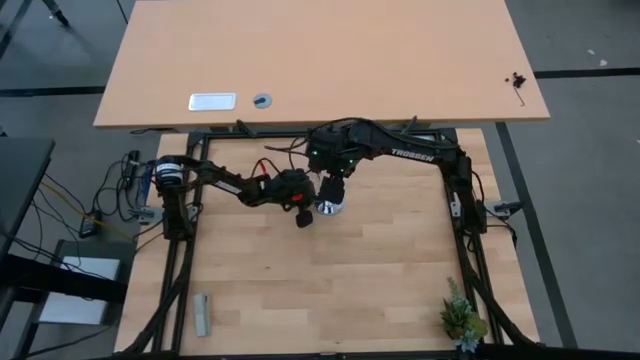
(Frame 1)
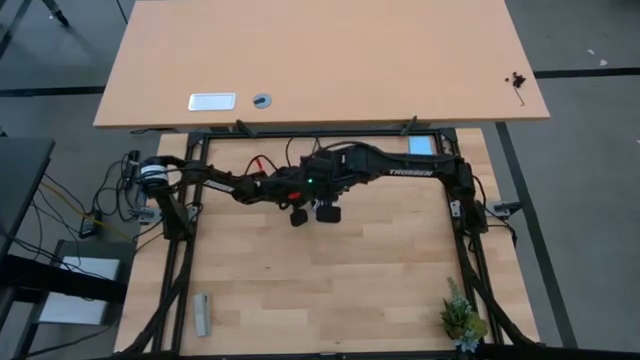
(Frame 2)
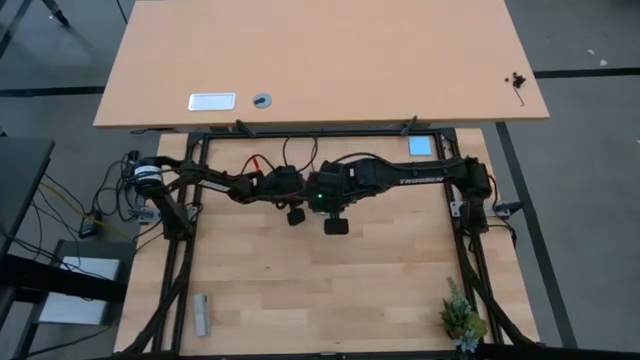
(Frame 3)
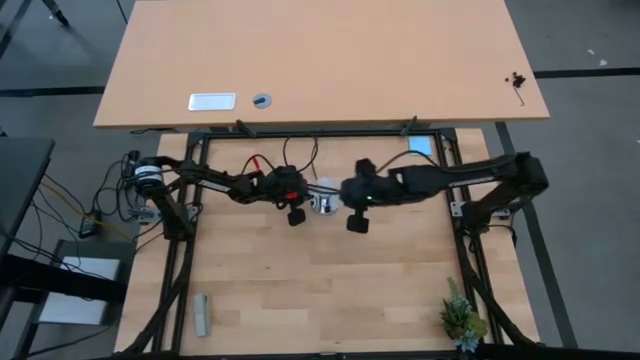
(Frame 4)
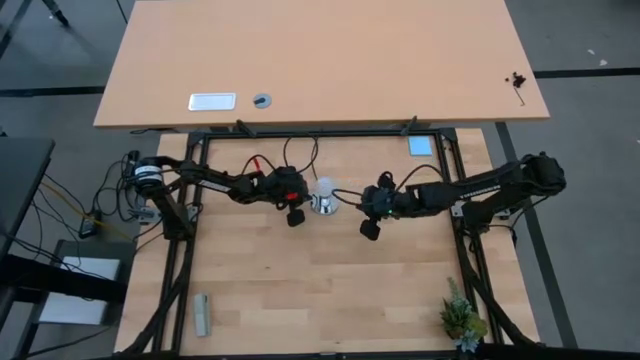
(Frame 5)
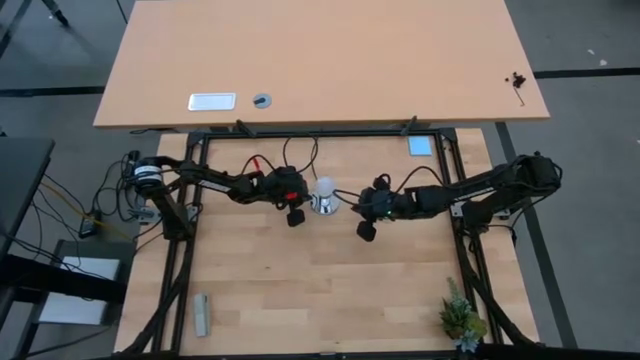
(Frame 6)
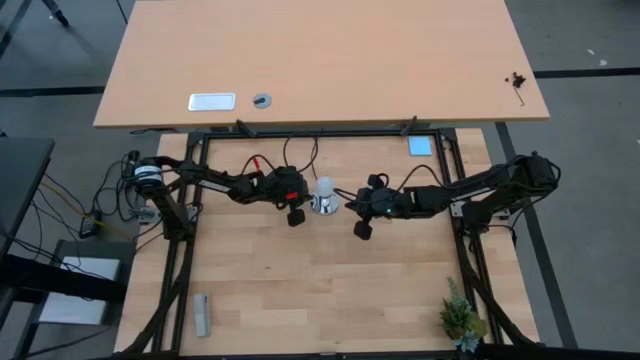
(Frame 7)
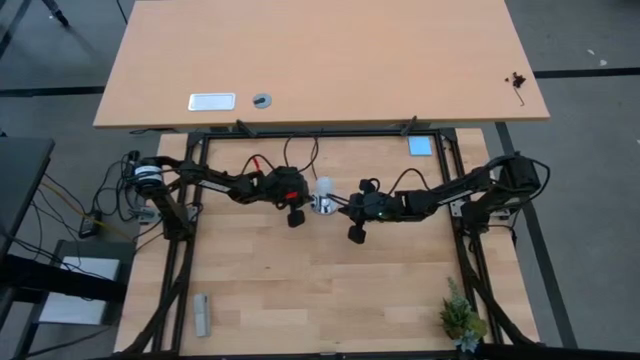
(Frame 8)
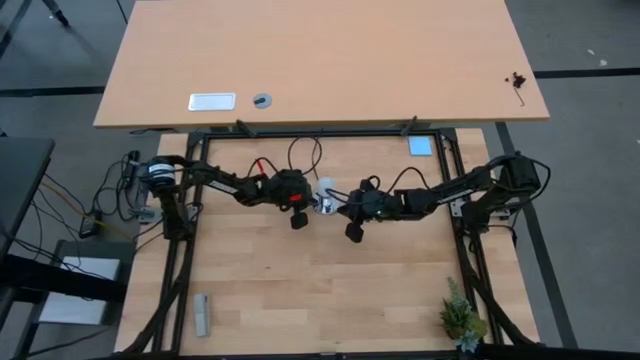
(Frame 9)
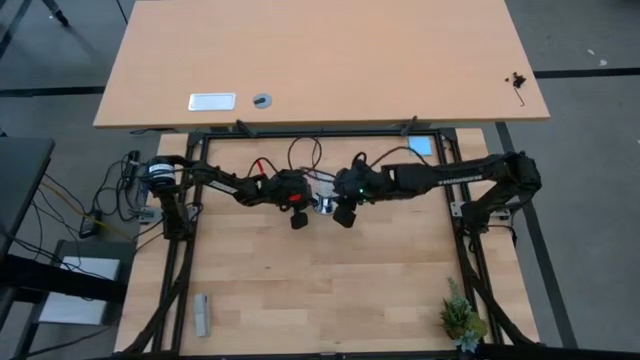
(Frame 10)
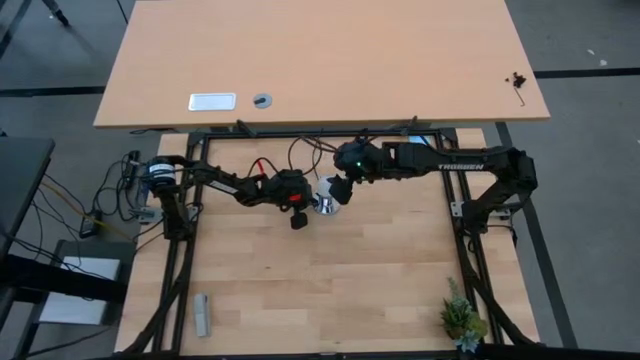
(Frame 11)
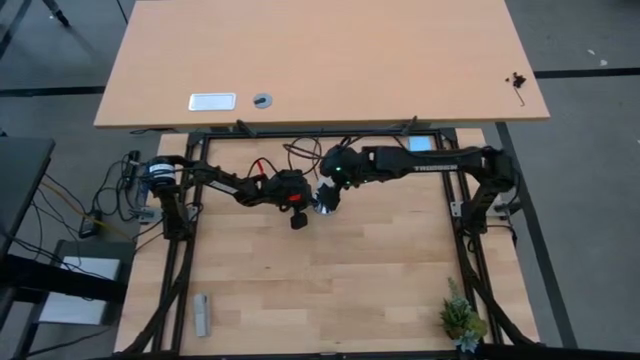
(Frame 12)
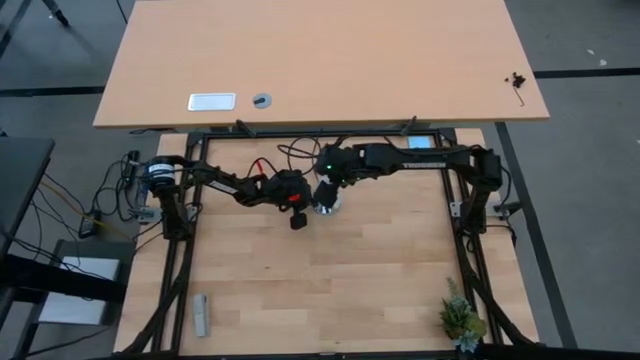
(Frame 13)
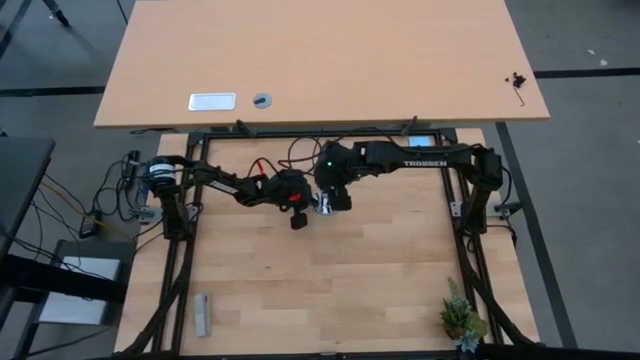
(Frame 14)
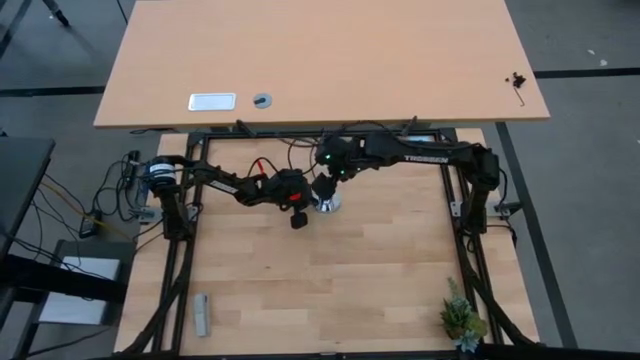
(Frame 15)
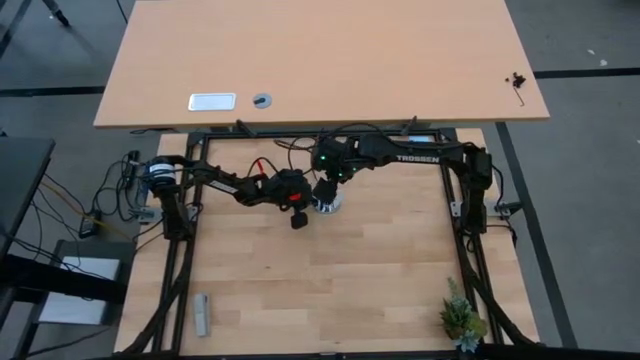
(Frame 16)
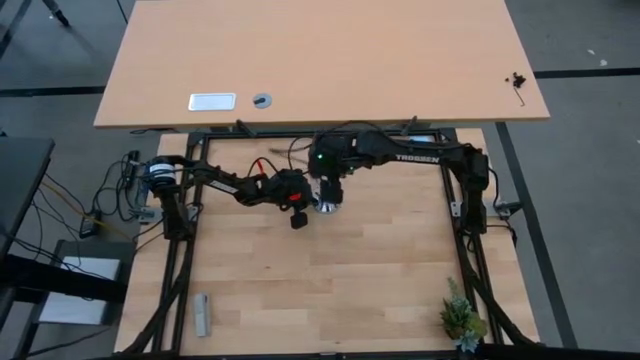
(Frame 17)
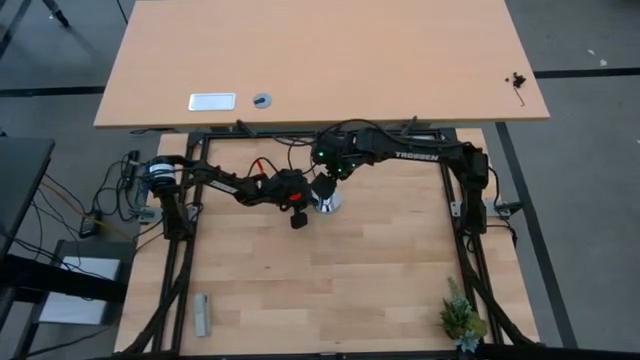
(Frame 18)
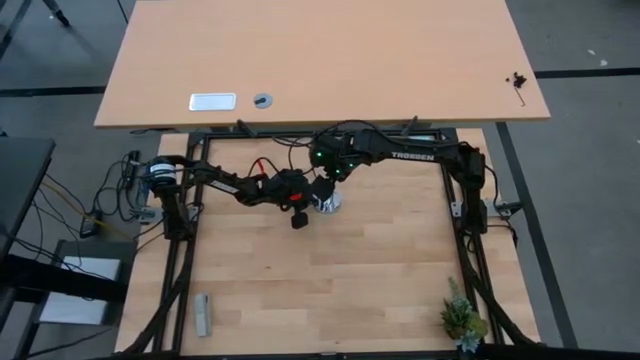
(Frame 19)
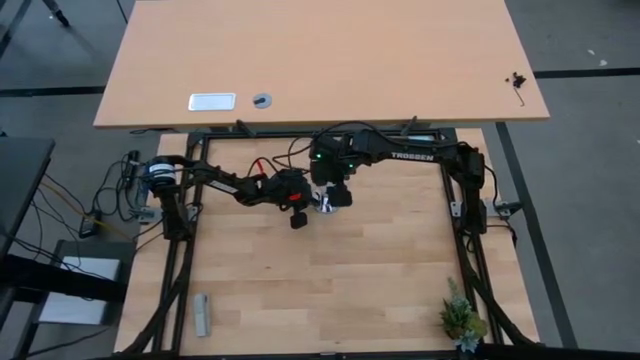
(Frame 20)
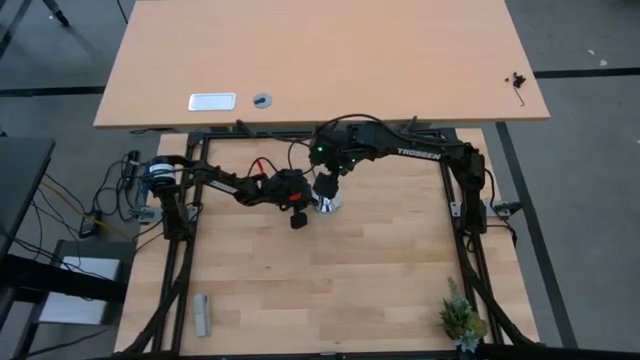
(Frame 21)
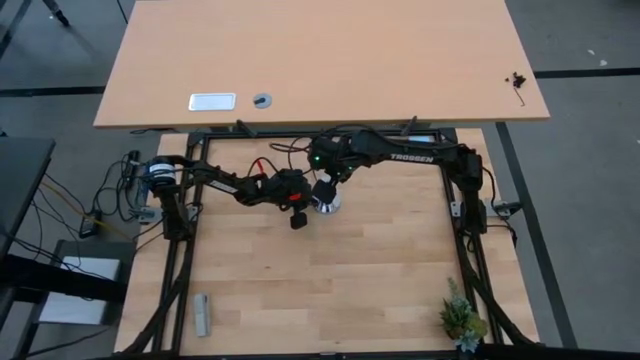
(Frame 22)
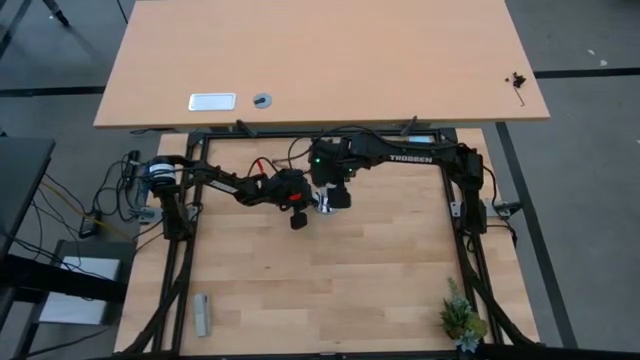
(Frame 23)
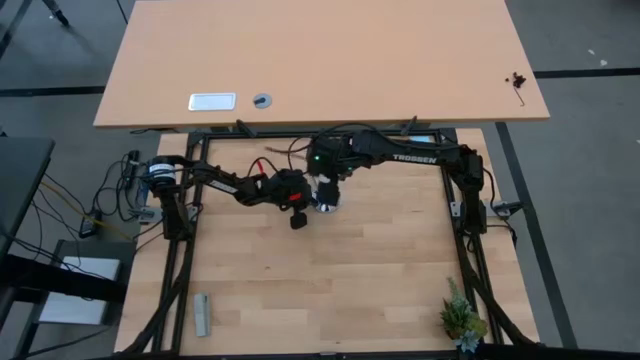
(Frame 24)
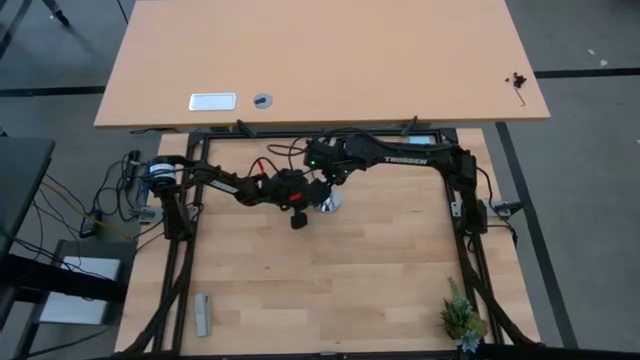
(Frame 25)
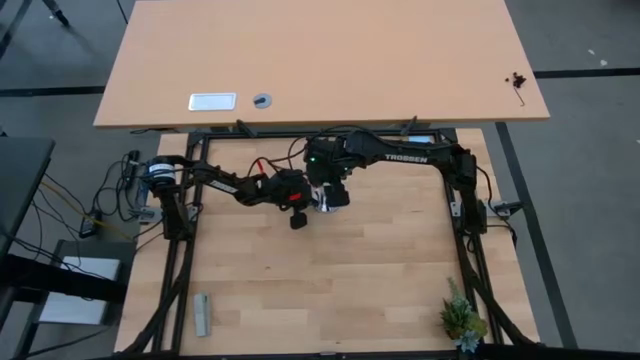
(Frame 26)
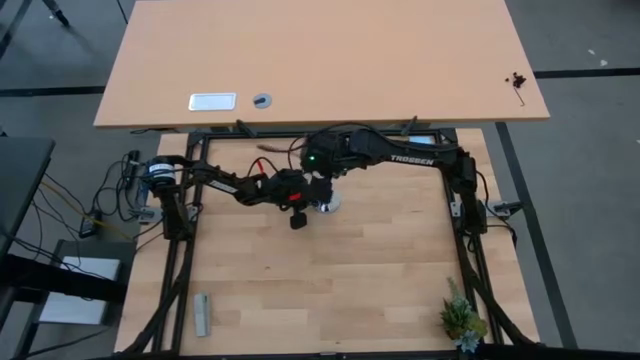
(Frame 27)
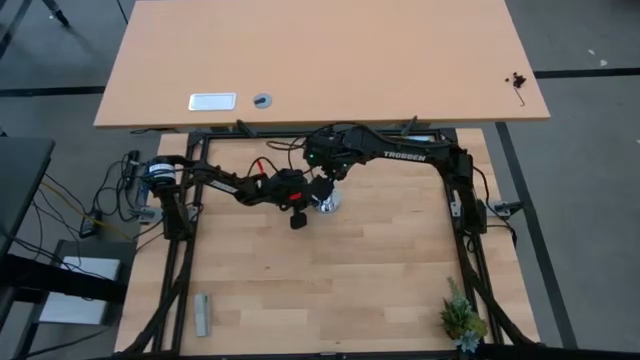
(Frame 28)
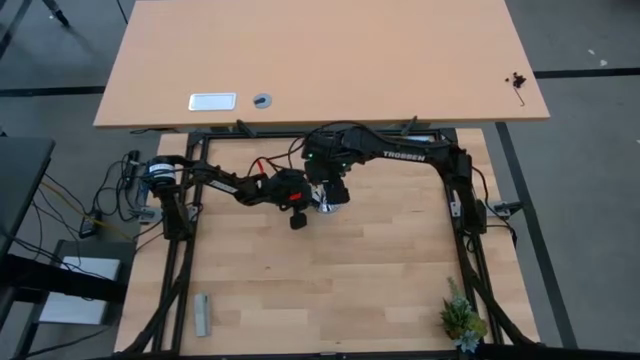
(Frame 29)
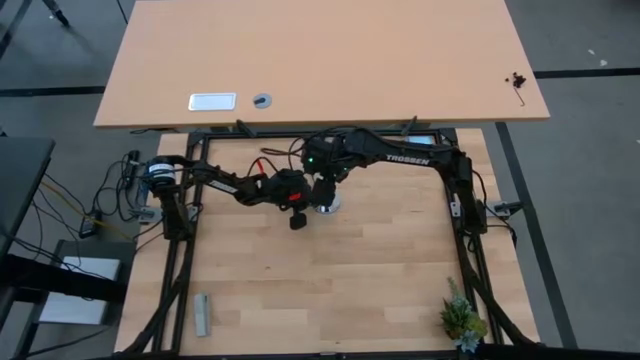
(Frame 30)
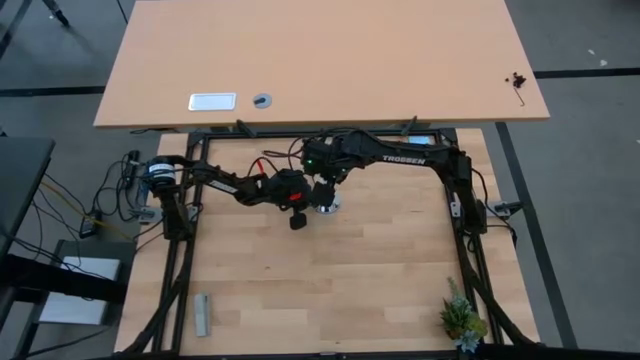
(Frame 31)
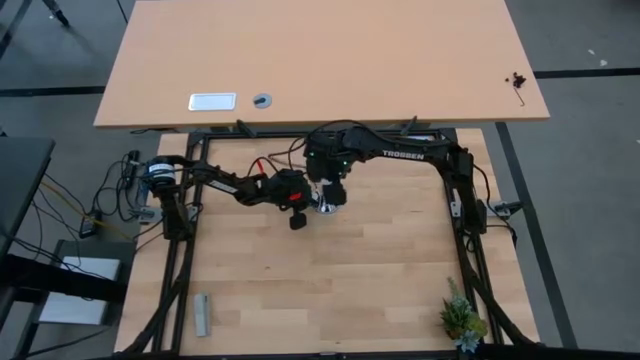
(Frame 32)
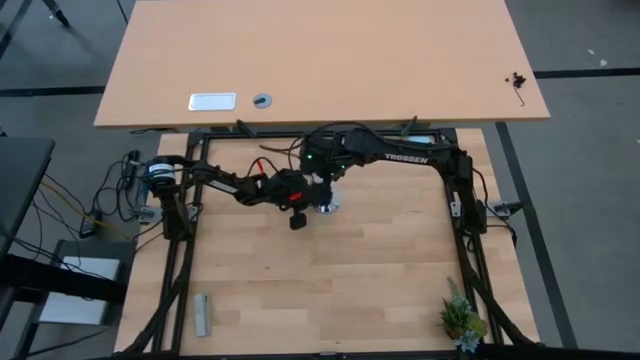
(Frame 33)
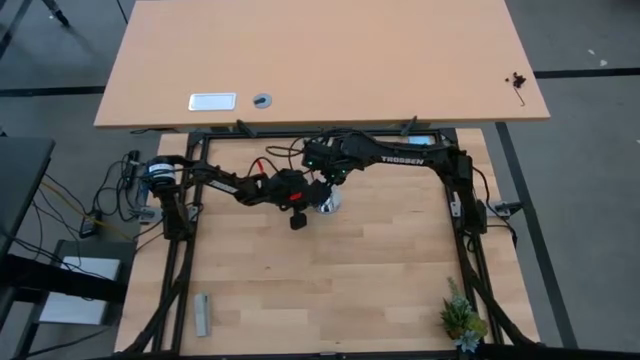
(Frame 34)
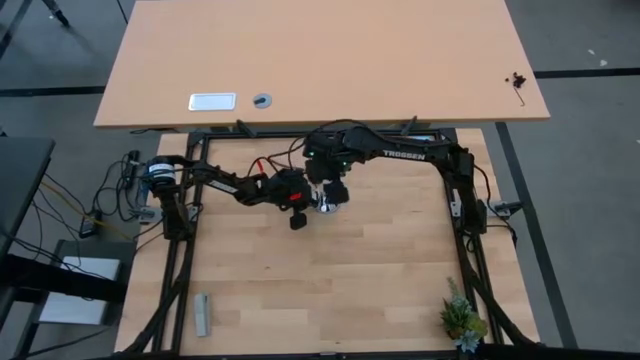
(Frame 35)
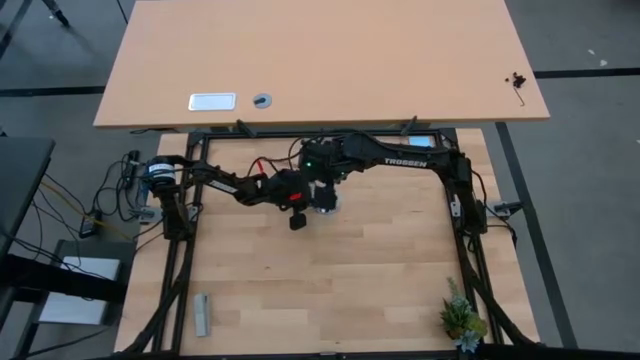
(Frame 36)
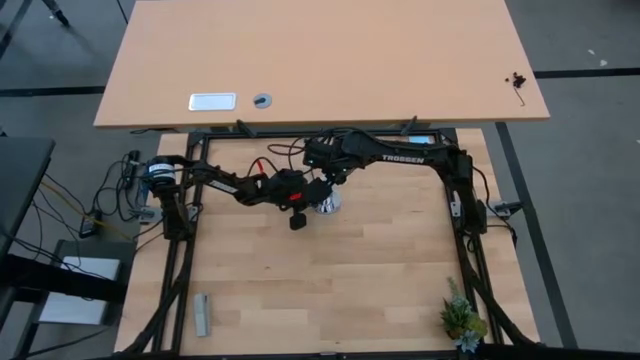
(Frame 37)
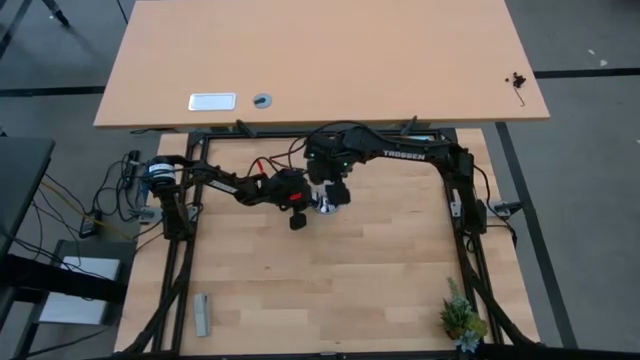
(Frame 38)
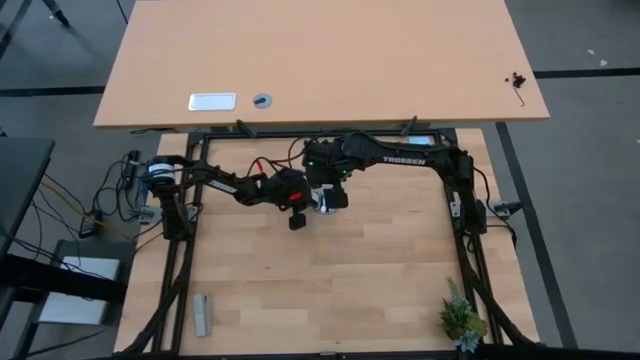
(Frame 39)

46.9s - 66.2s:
Task: Screw lightbulb
Remove the lightbulb from the lamp socket

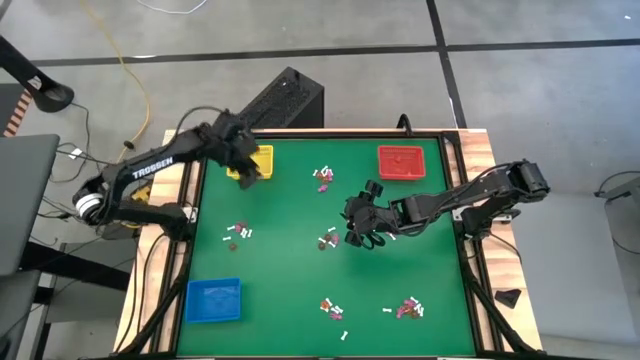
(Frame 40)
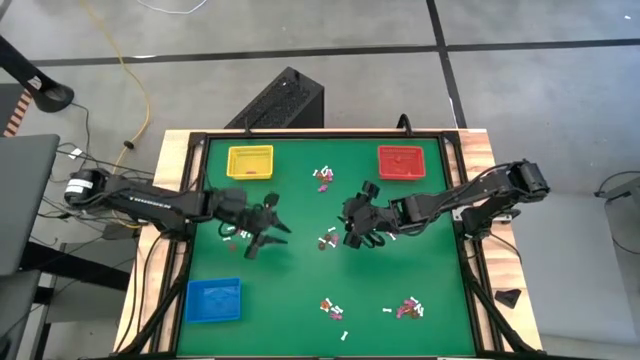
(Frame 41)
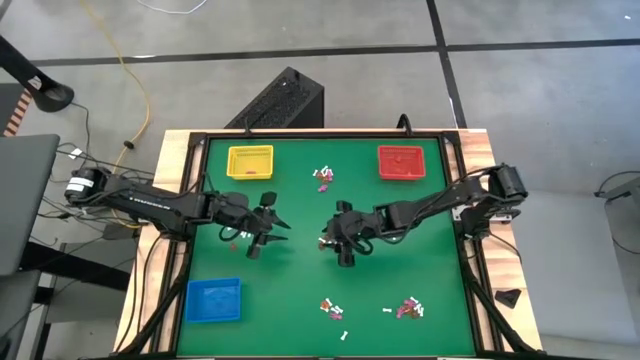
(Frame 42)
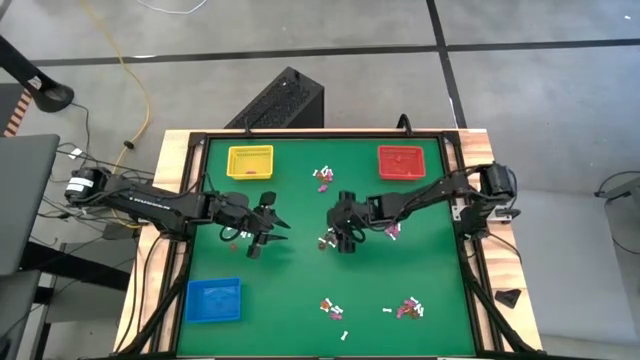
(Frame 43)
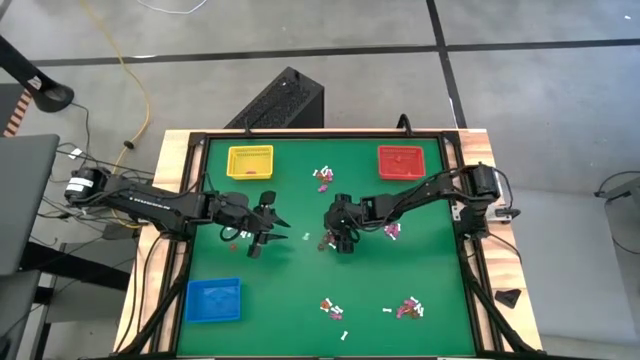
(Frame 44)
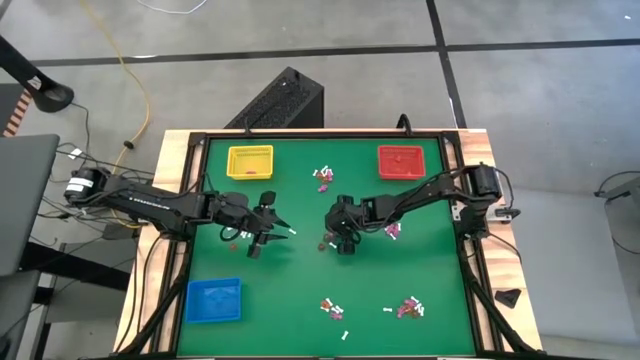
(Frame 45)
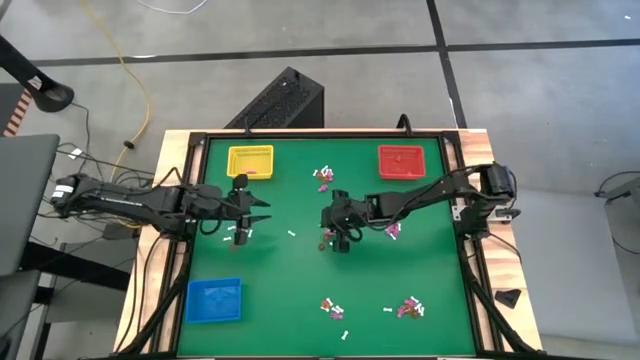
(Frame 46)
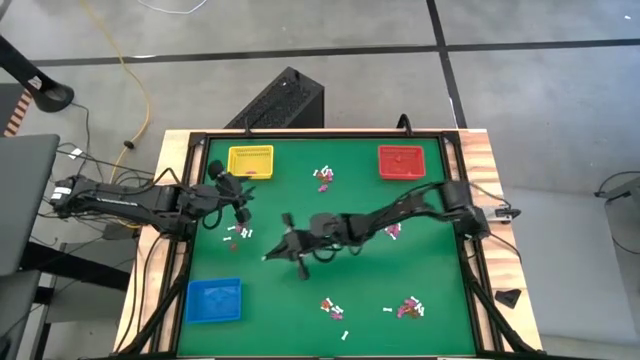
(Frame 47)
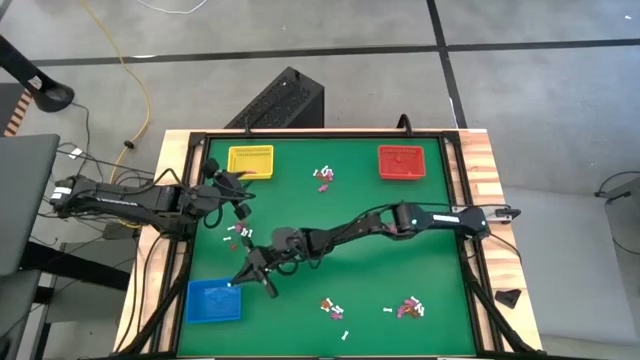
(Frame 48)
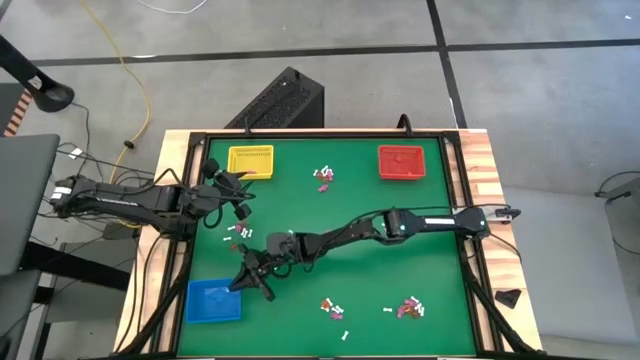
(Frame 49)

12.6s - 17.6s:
Task: Sort Halloween decoration
Put the white bone toy into the blue bin
